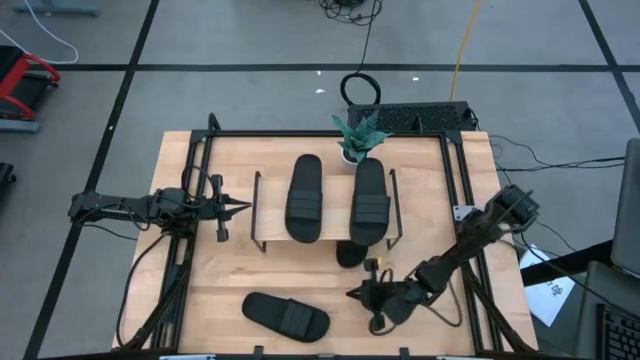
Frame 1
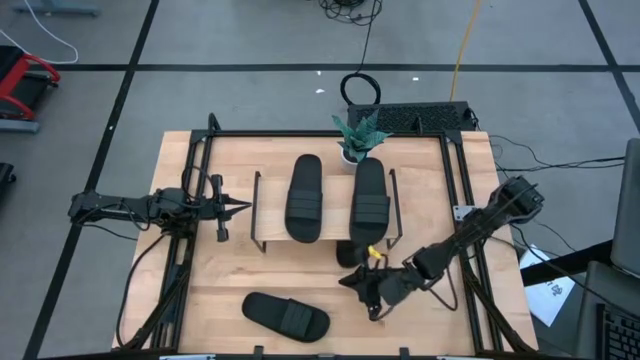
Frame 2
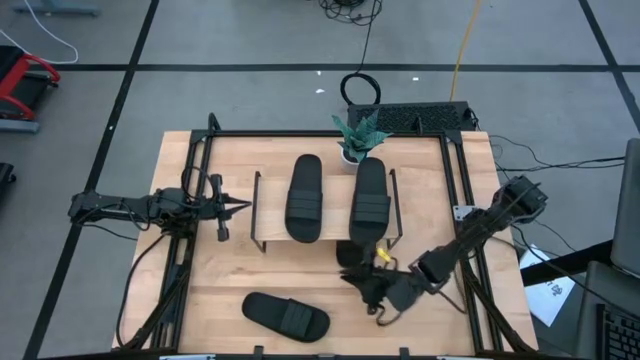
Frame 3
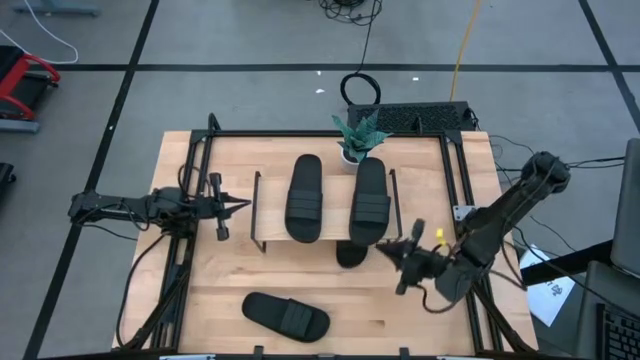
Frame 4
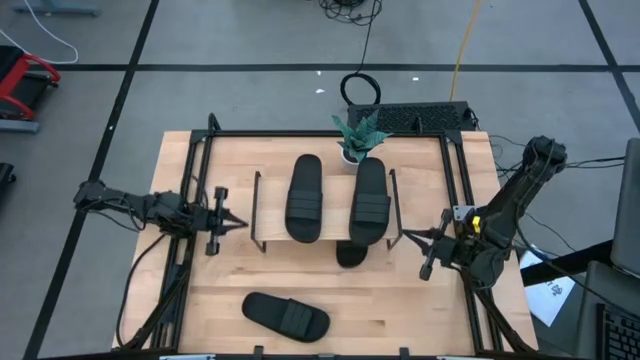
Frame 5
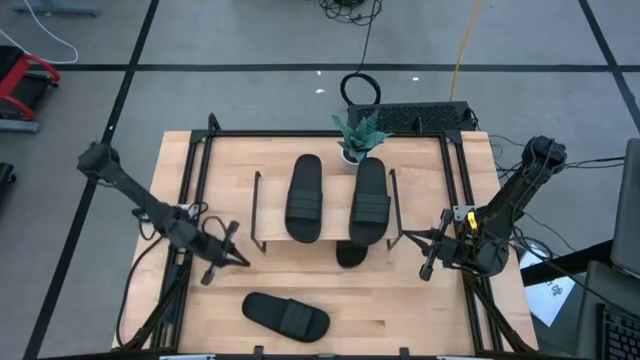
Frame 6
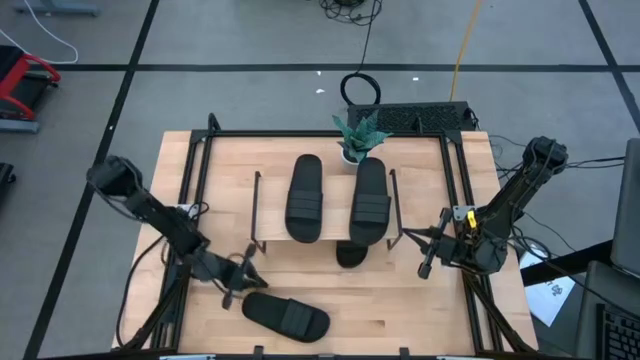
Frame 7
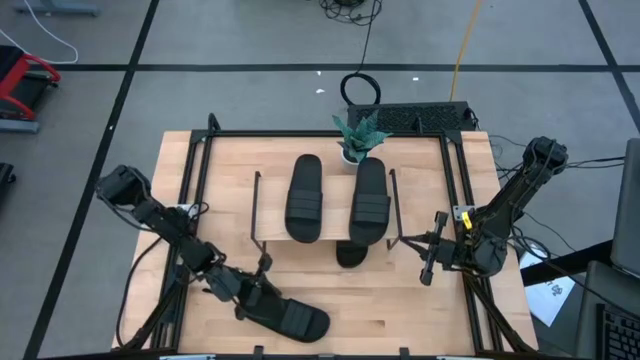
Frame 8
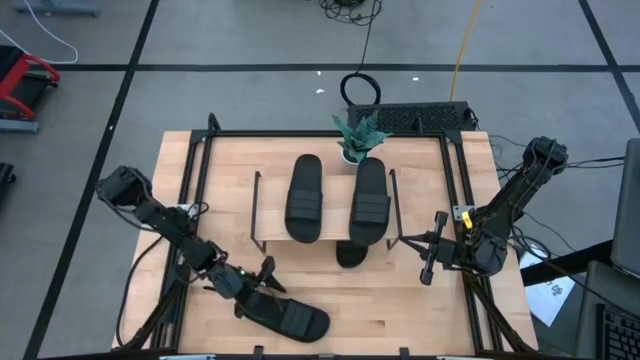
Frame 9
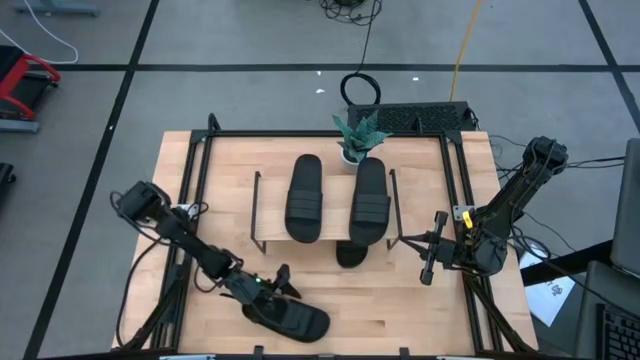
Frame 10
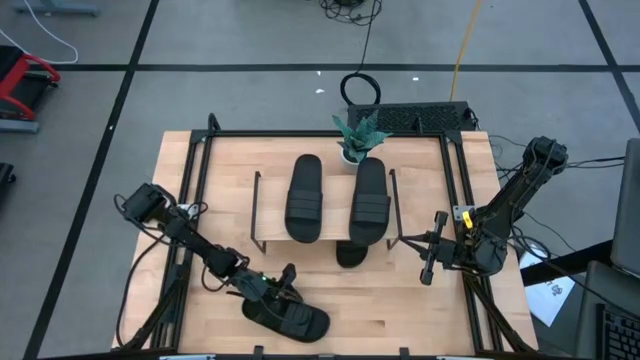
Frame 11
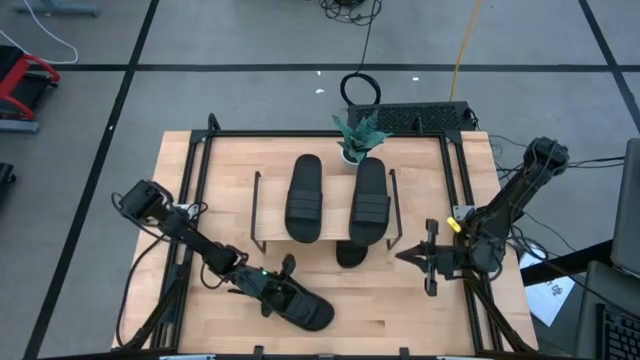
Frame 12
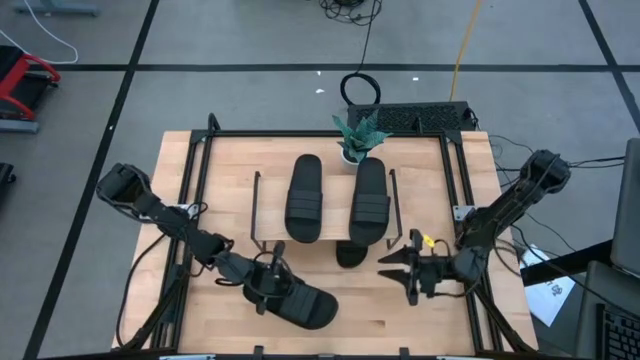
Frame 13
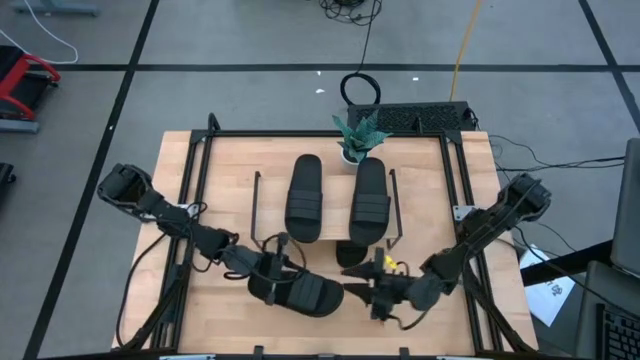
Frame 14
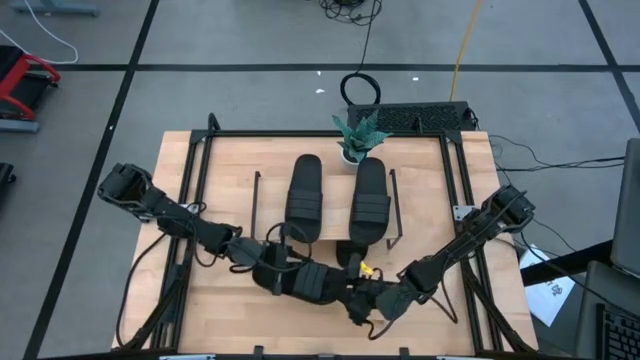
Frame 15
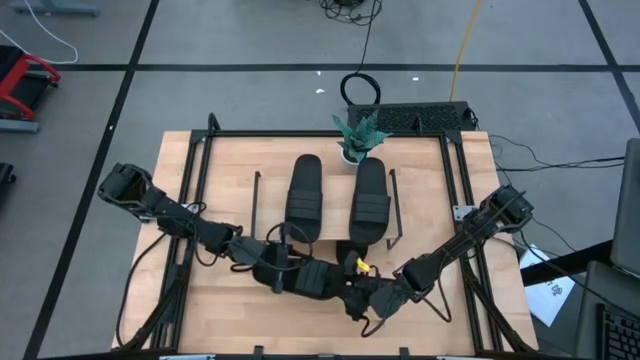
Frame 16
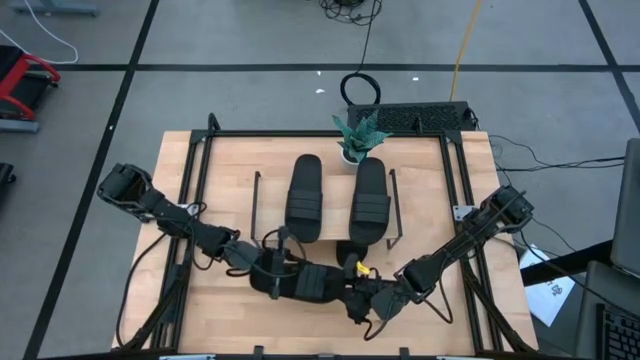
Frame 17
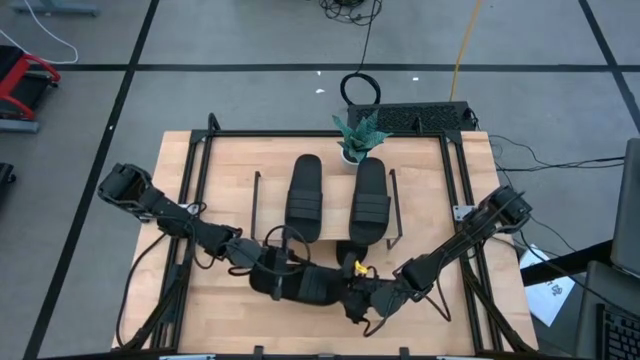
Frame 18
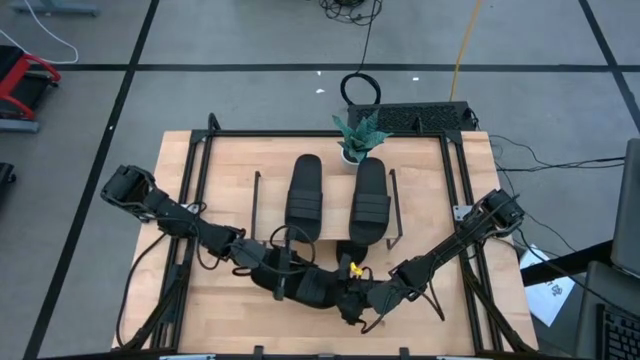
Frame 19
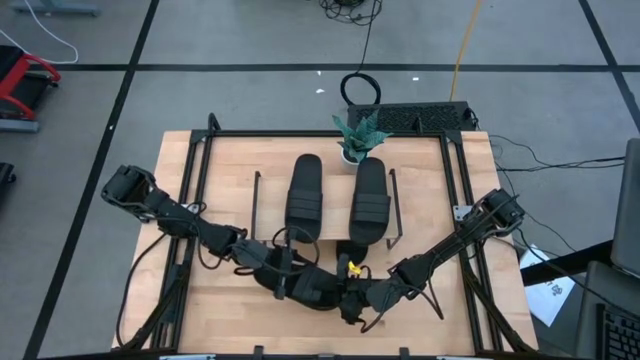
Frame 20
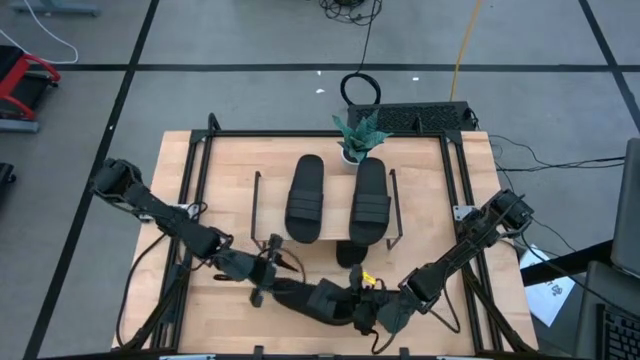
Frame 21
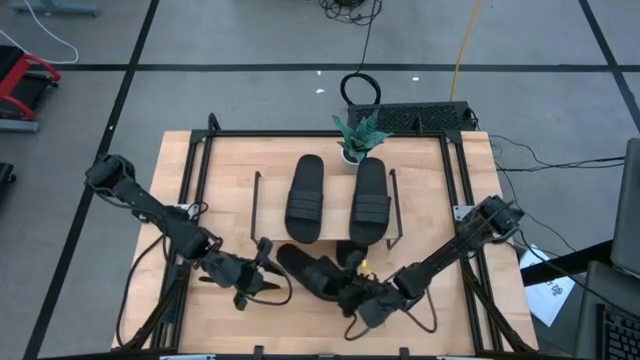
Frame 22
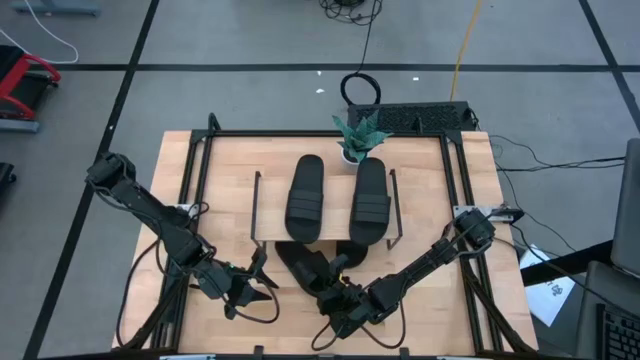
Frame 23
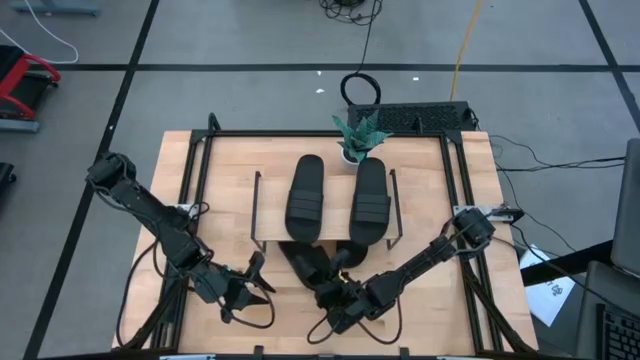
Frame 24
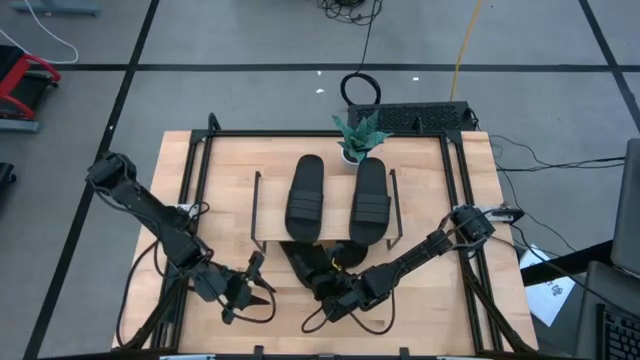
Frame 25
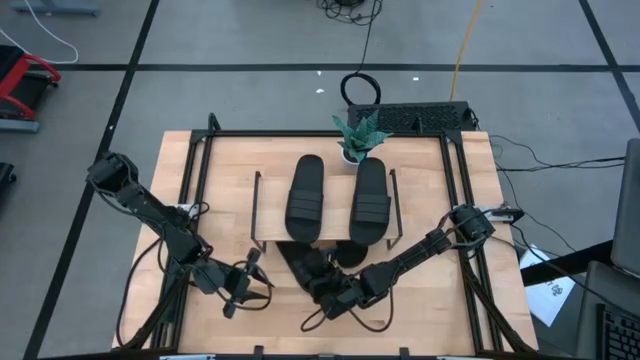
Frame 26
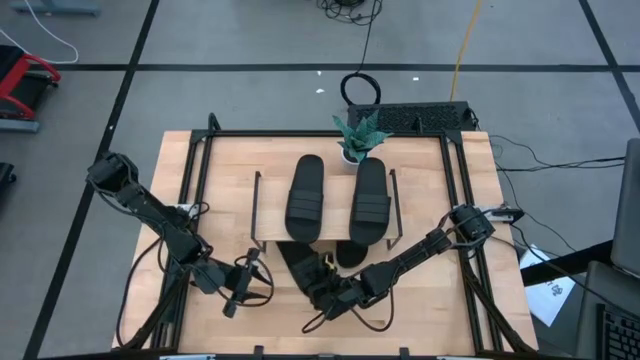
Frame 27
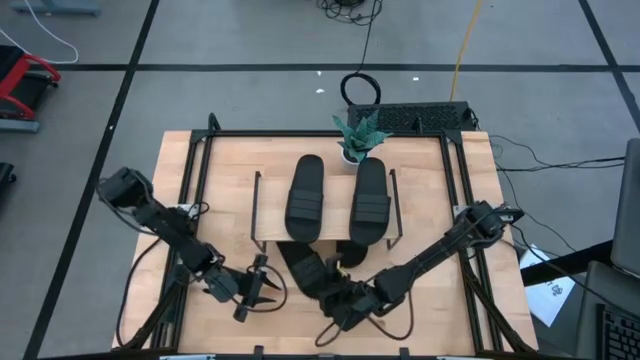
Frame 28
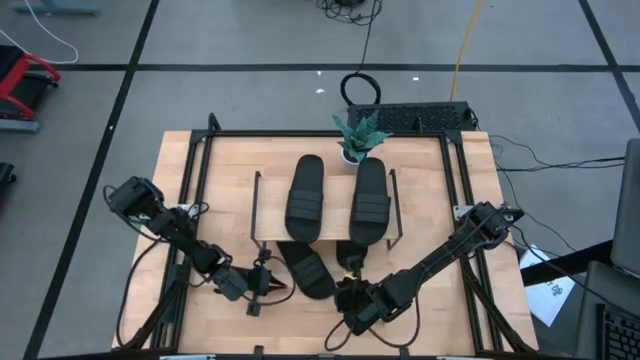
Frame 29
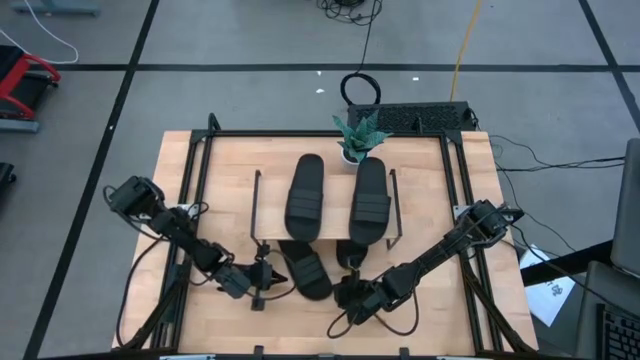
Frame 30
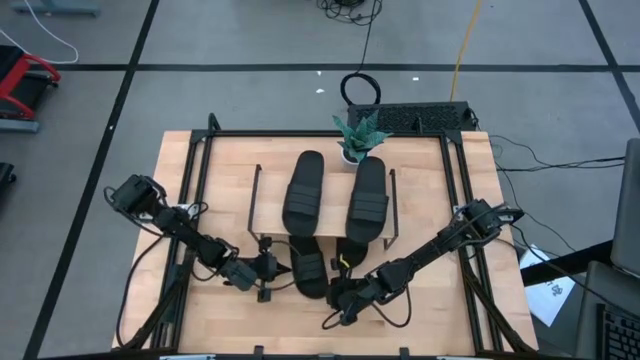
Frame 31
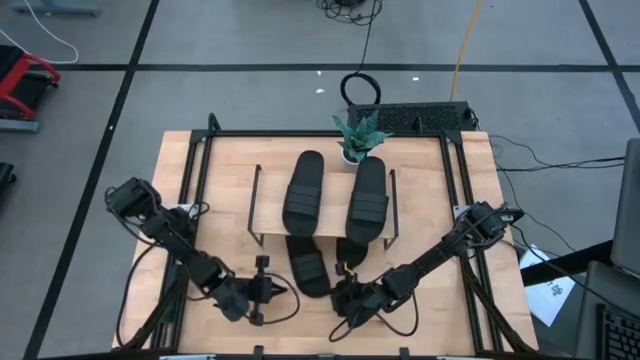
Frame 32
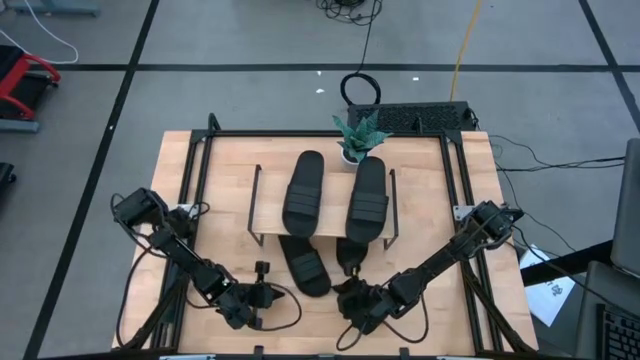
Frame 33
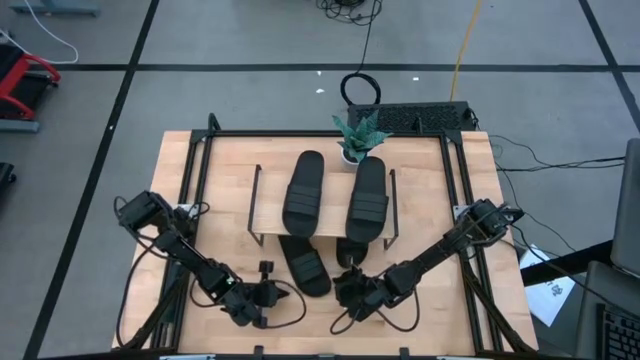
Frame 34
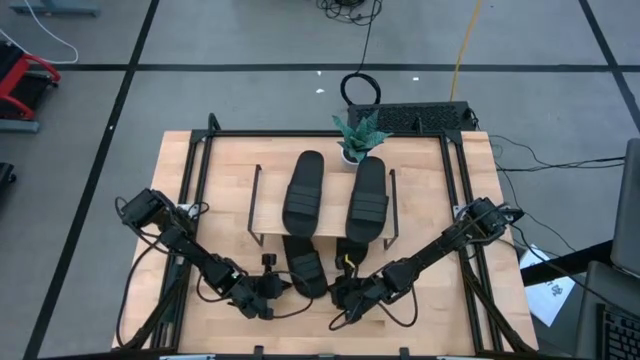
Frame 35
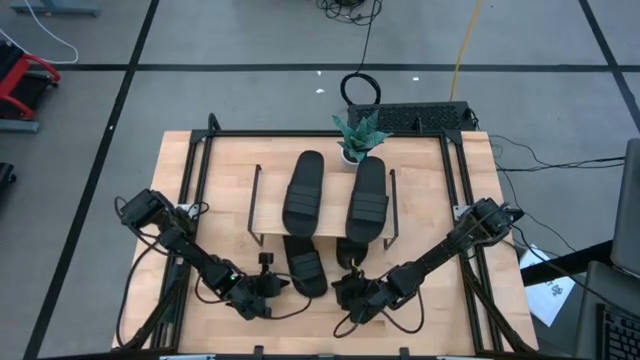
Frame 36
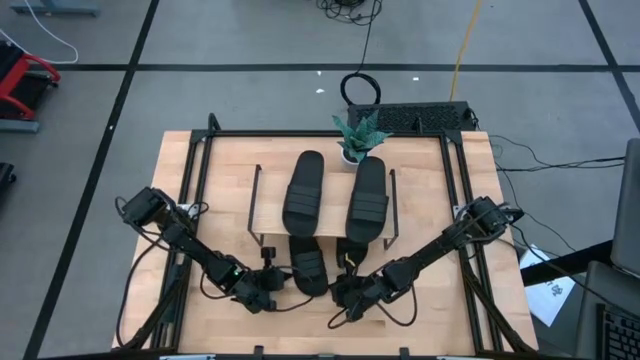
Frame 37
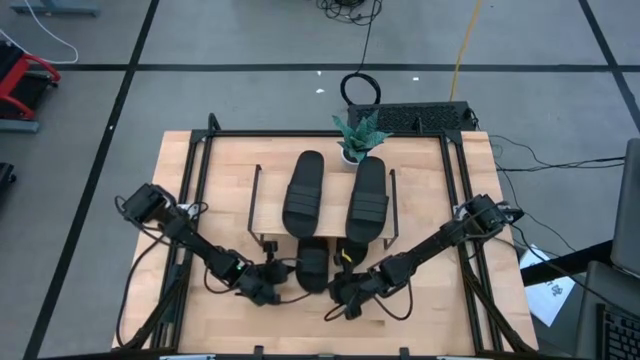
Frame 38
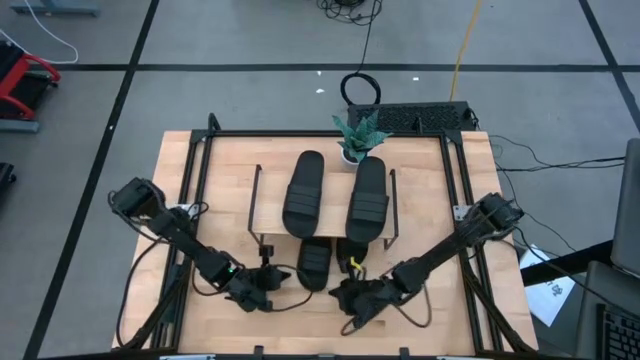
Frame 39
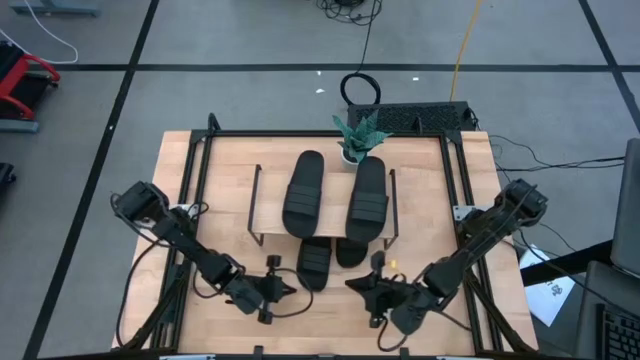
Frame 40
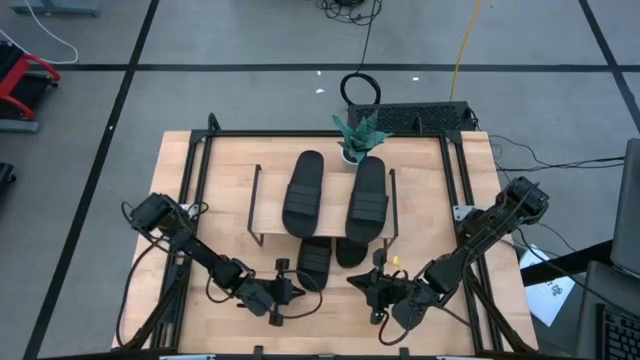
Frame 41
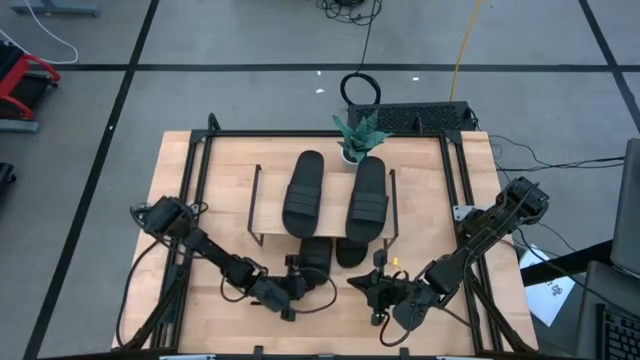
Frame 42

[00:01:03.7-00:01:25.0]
Task: Pick and place slides into the shelf
Put the black slipper under the shelf
